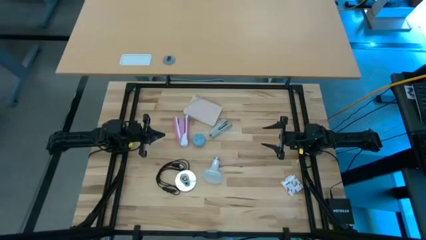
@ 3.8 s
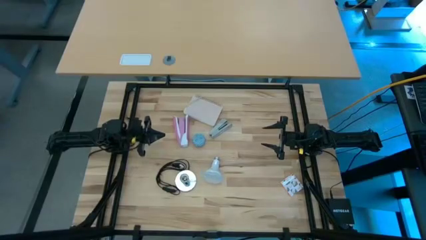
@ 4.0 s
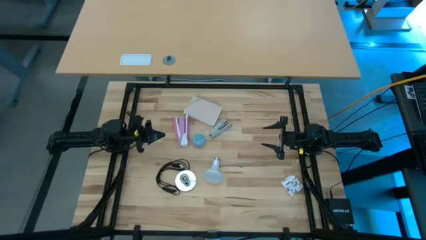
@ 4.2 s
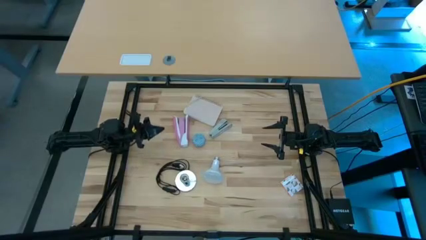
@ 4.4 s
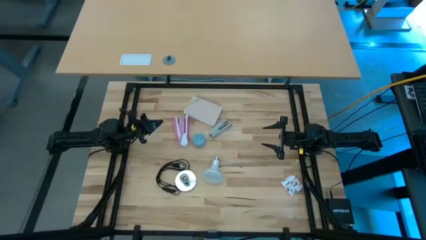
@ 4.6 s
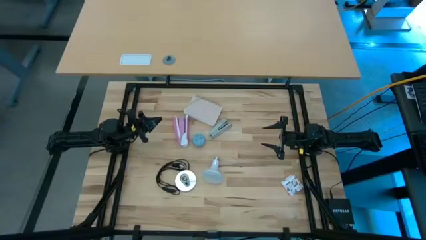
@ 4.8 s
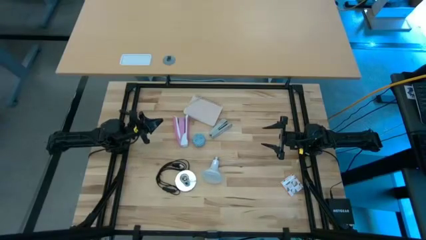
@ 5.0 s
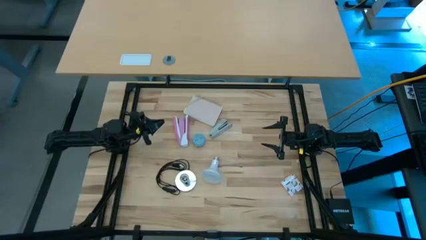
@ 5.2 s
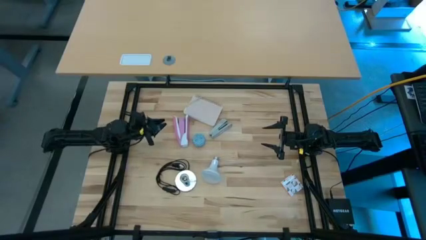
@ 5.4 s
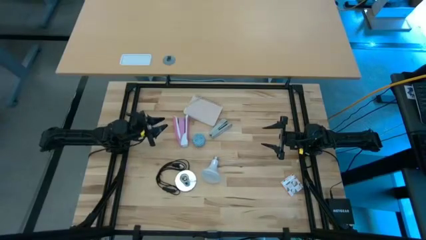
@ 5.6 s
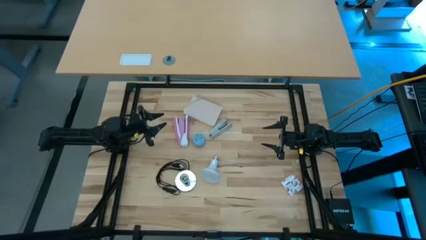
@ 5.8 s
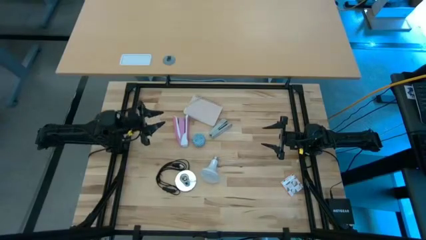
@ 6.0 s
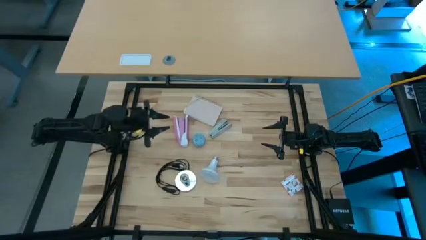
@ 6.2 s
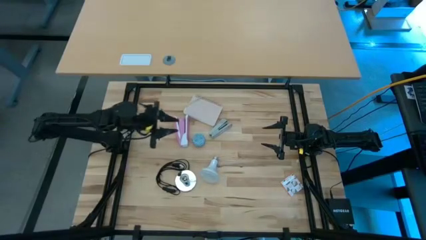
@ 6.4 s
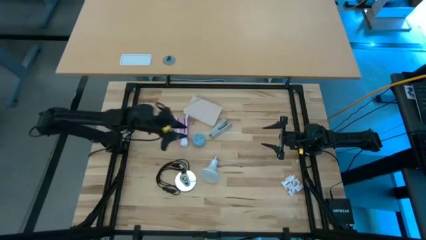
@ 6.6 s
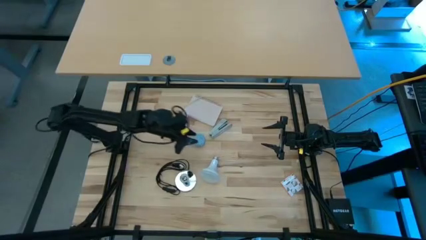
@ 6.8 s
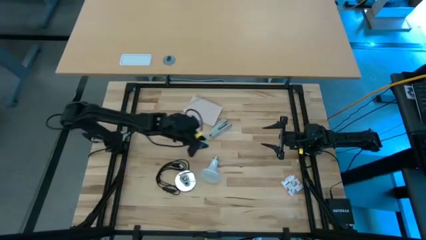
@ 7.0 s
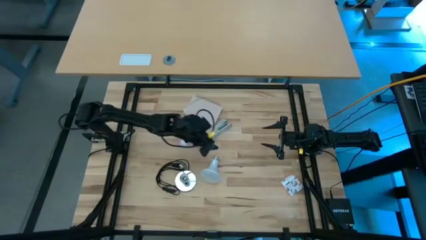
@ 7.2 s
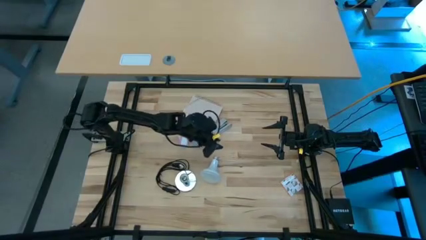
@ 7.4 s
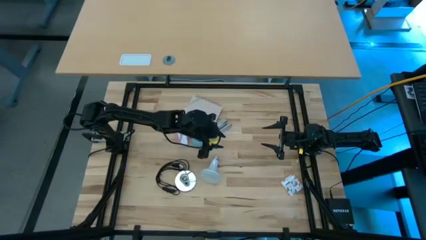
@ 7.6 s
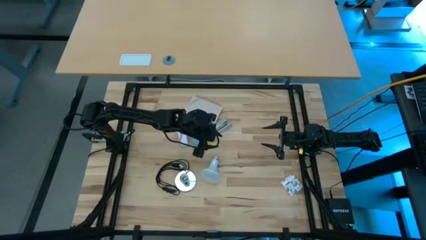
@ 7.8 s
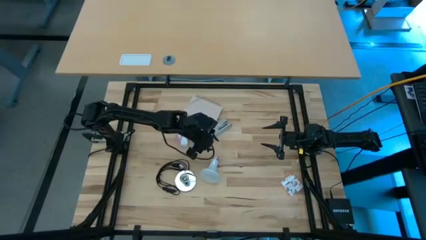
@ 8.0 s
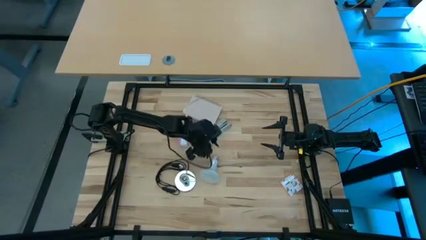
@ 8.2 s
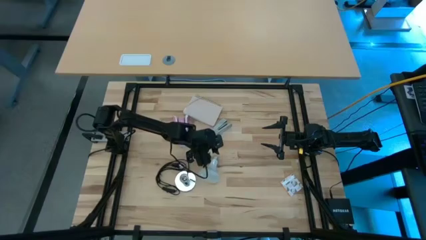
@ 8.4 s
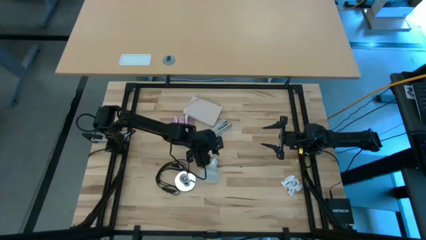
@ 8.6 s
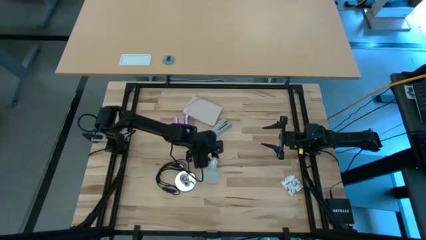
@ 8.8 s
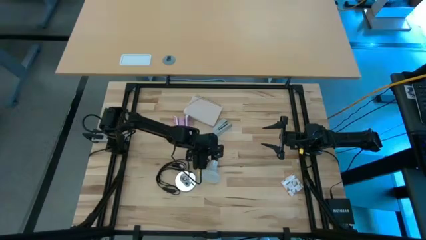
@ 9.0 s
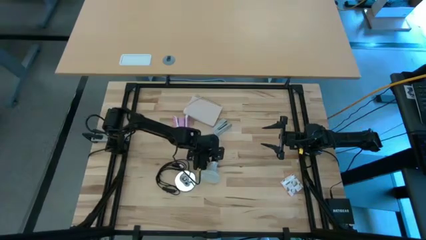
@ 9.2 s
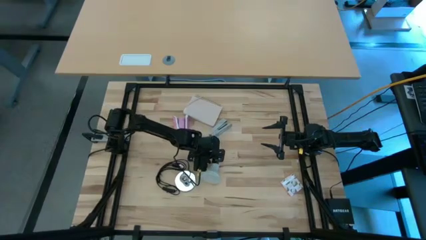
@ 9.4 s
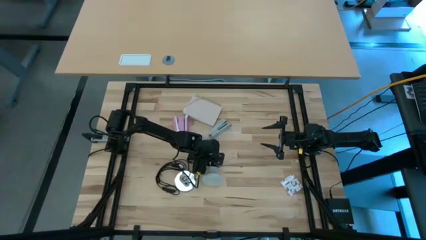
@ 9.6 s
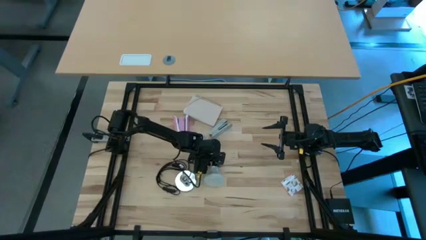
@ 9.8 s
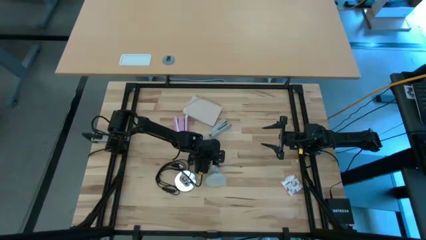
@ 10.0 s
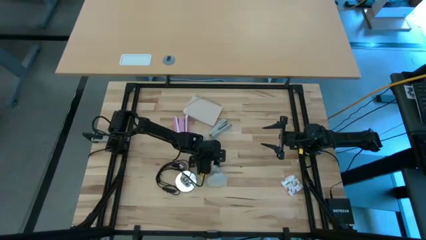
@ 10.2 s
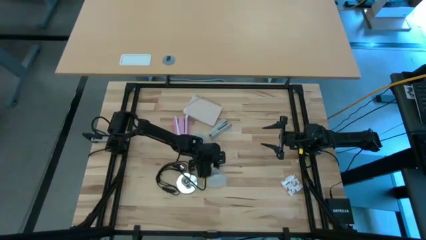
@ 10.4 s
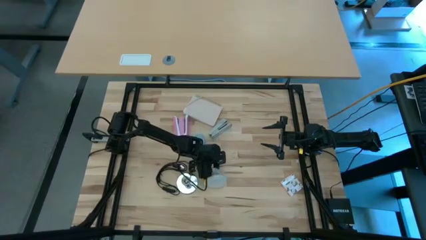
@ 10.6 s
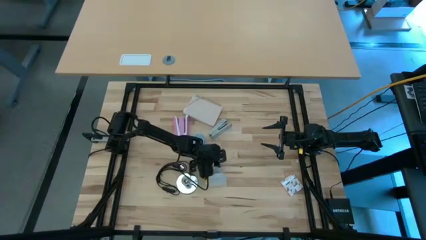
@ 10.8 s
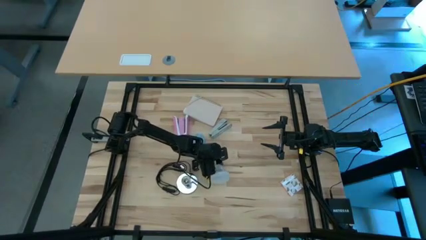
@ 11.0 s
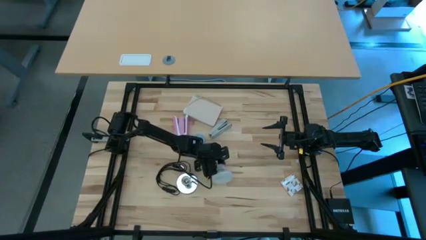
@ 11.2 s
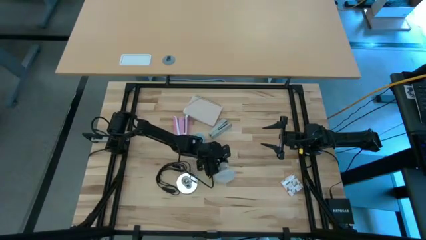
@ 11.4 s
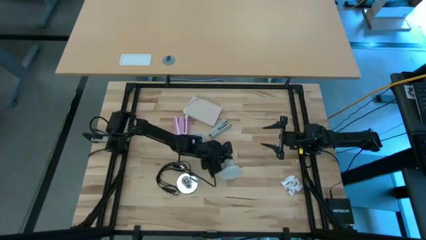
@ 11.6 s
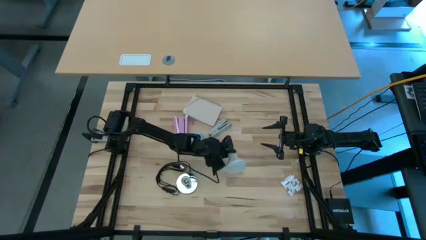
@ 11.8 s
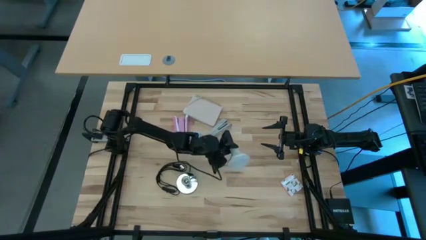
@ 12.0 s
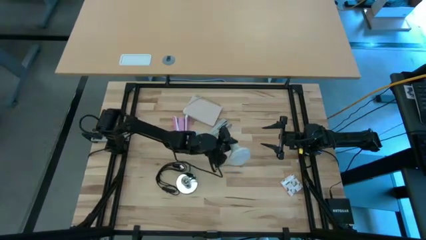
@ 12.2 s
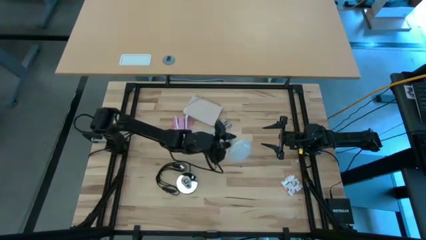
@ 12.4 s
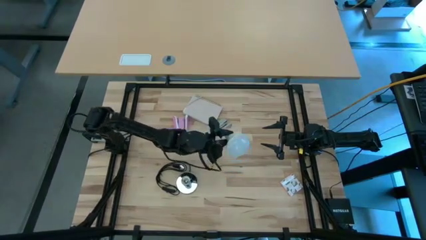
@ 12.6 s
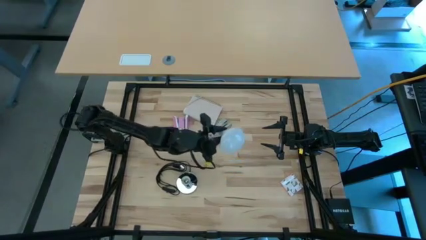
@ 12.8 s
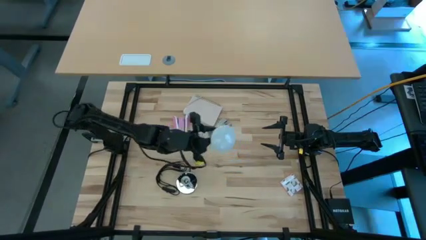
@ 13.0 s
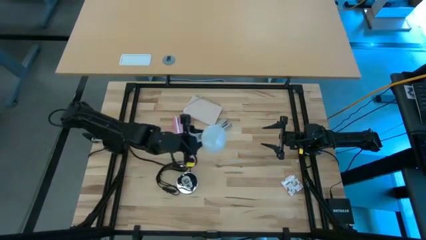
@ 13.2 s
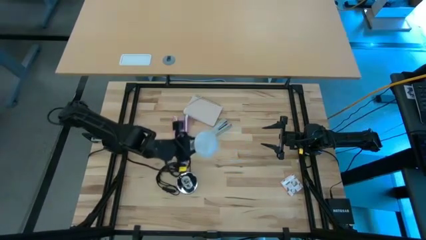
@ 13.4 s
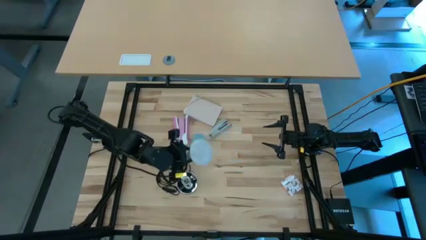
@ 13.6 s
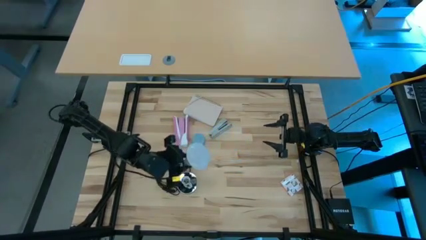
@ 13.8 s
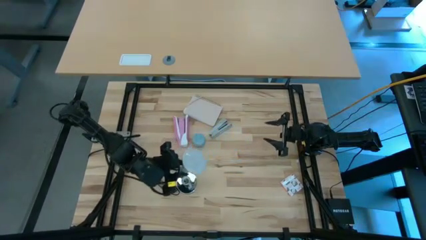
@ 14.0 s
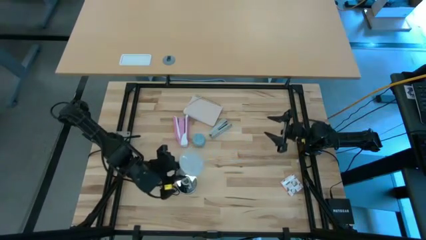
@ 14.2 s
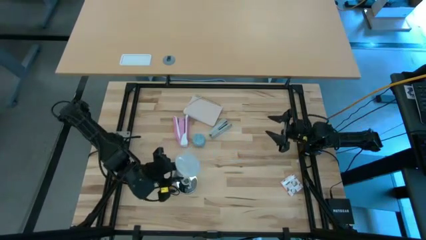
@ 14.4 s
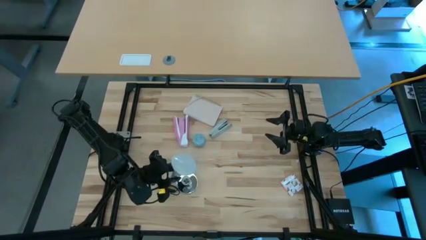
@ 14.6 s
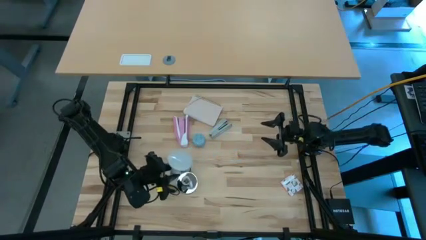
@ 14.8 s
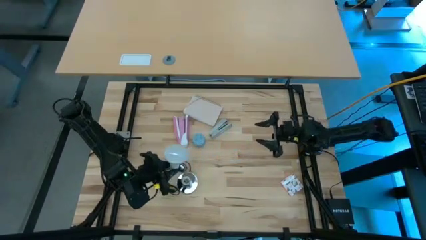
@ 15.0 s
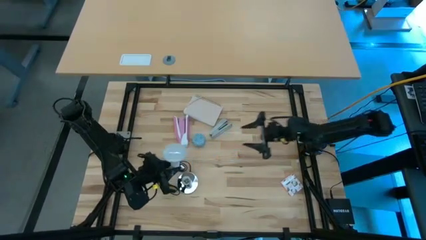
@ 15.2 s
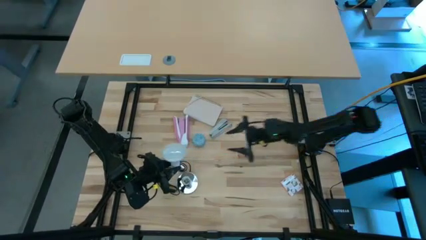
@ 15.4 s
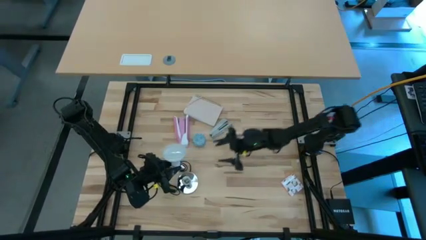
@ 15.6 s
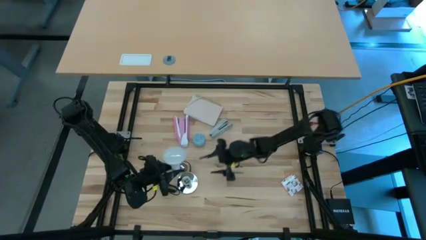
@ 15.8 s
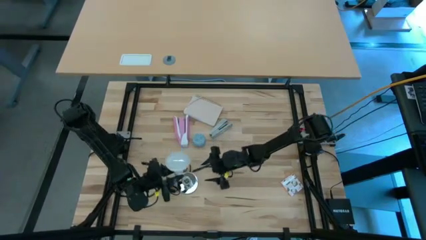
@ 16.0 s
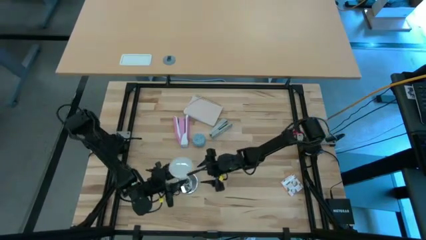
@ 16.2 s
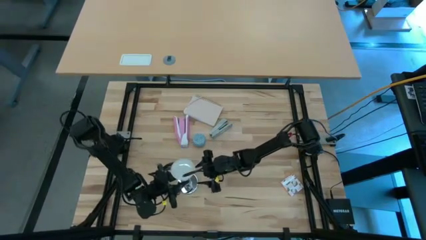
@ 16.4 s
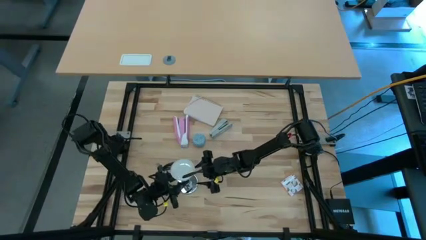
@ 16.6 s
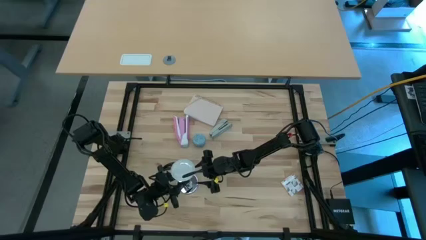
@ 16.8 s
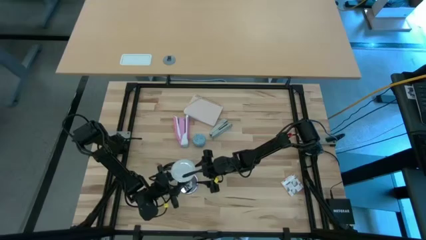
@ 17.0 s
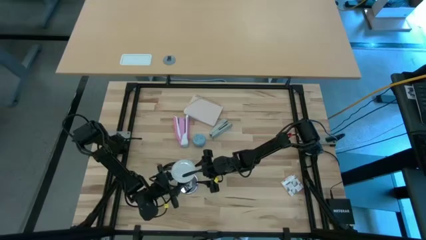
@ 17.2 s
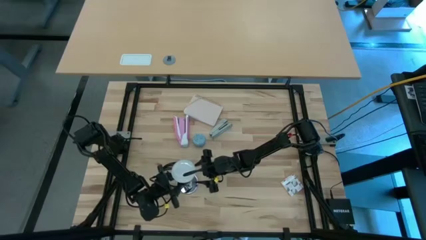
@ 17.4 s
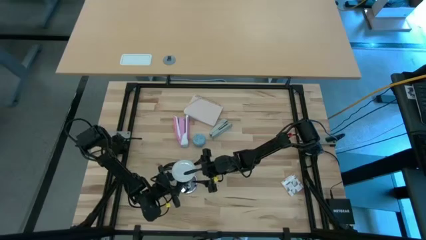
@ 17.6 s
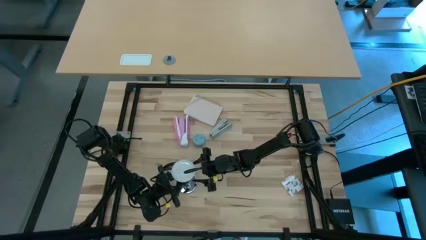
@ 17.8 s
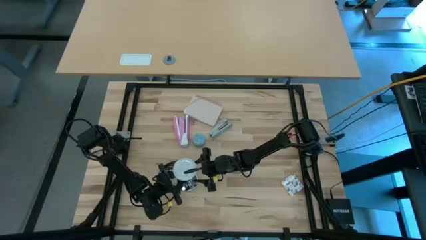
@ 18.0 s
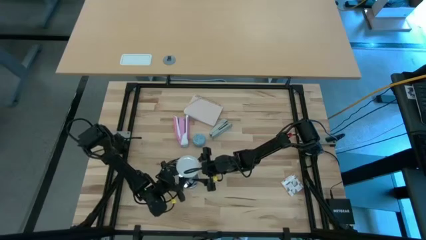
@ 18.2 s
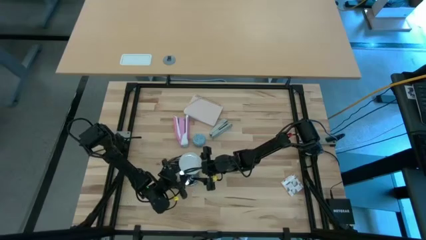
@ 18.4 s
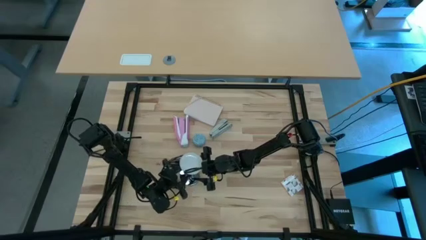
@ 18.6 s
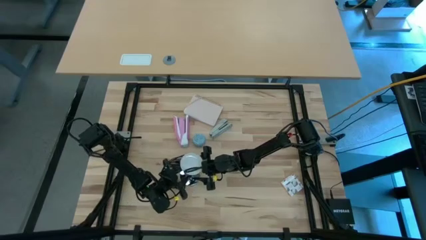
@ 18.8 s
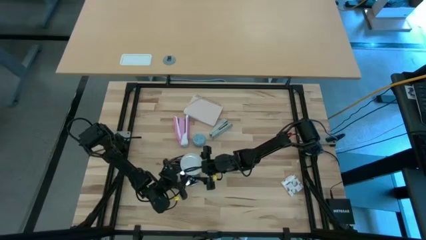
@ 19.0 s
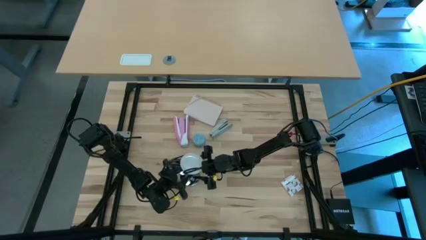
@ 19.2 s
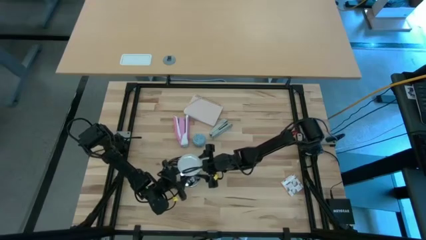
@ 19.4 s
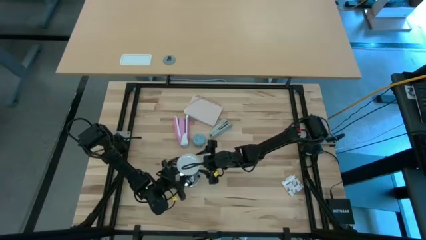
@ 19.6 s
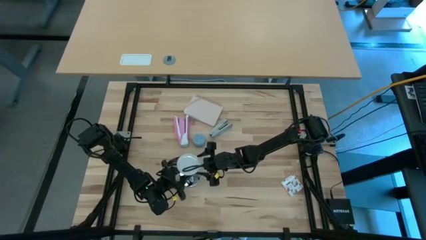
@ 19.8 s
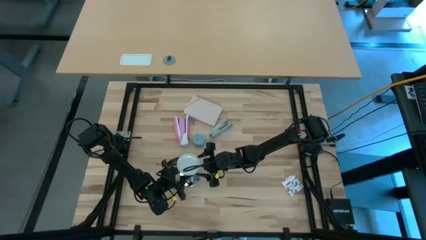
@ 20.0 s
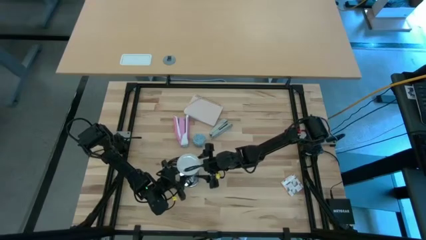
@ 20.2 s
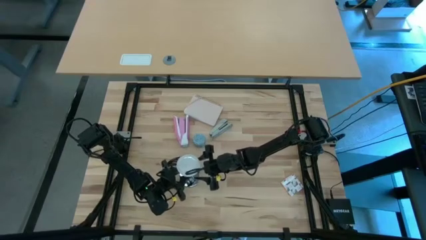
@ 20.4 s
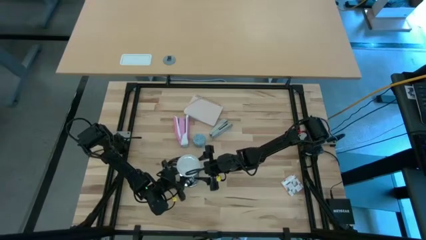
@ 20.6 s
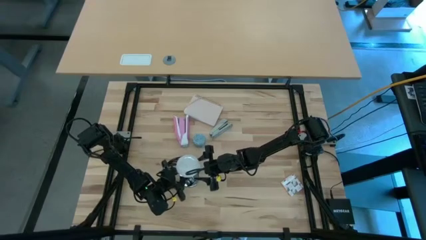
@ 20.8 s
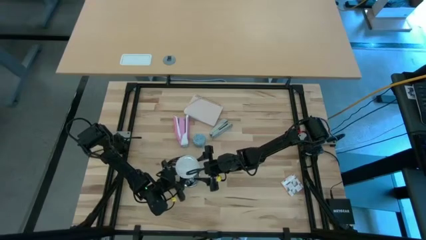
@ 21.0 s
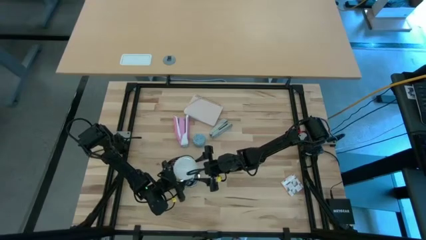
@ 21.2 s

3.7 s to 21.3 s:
Task: Screw lightbulb
Insert the lightbulb into the lamp
